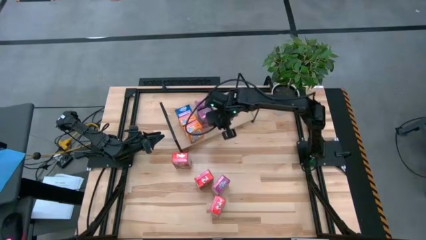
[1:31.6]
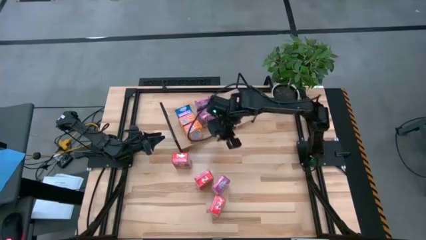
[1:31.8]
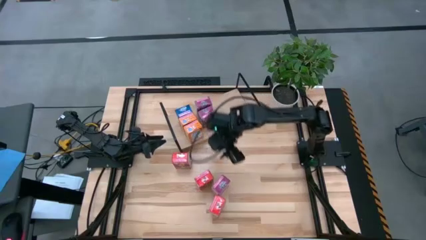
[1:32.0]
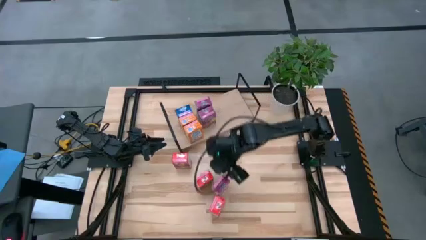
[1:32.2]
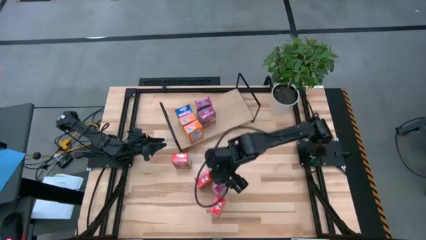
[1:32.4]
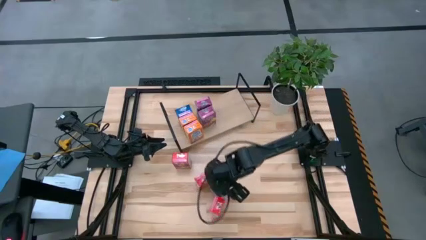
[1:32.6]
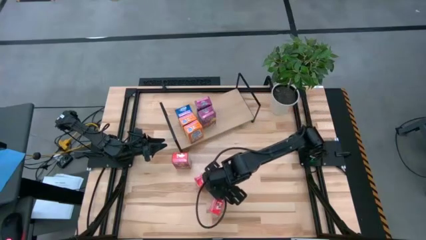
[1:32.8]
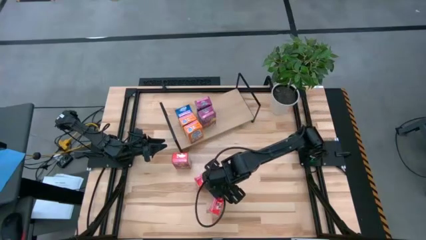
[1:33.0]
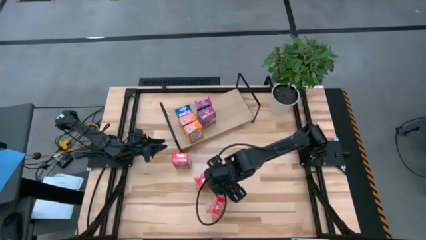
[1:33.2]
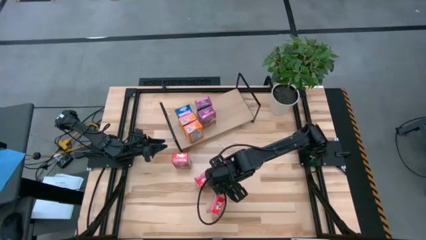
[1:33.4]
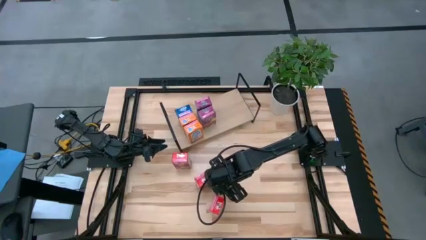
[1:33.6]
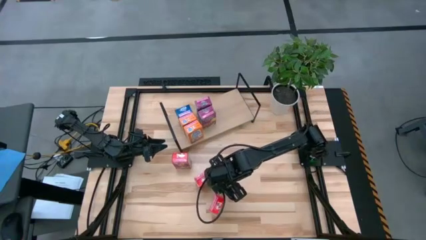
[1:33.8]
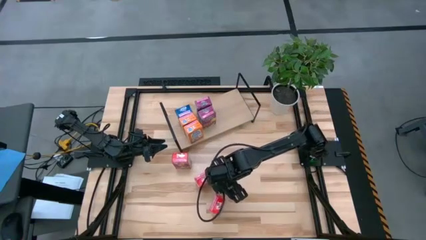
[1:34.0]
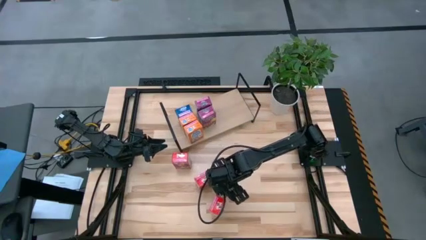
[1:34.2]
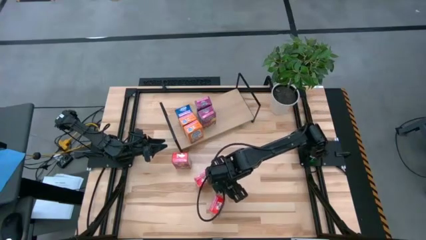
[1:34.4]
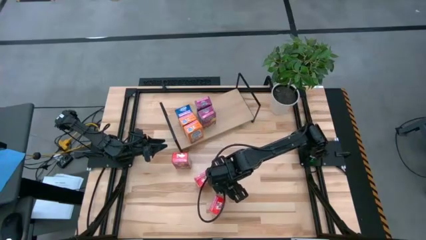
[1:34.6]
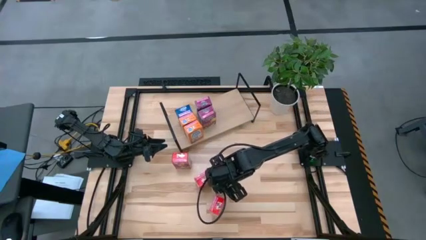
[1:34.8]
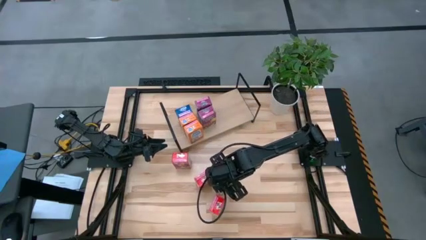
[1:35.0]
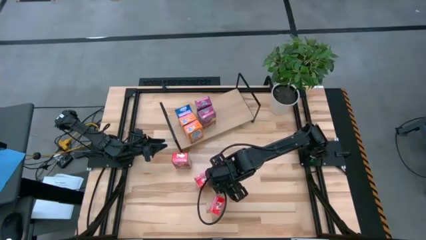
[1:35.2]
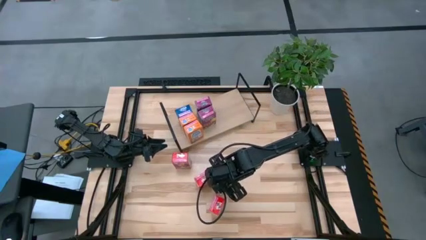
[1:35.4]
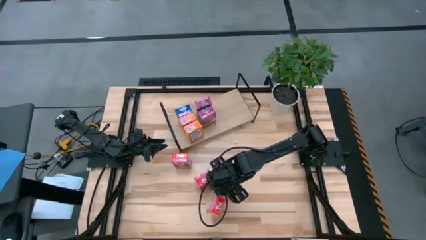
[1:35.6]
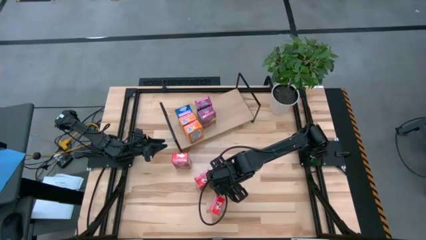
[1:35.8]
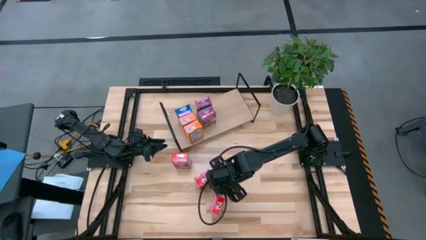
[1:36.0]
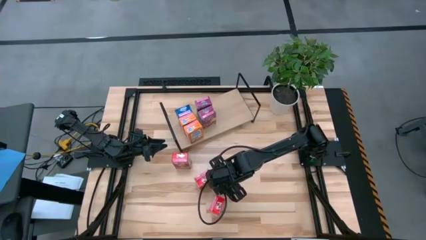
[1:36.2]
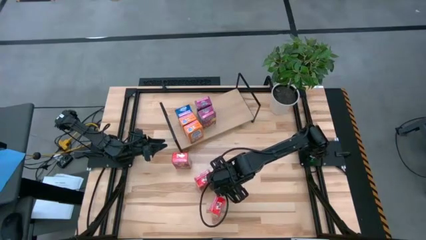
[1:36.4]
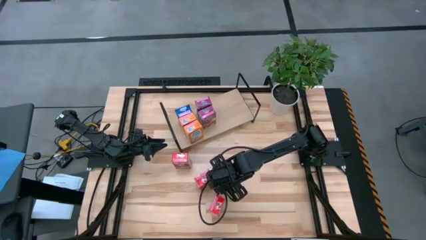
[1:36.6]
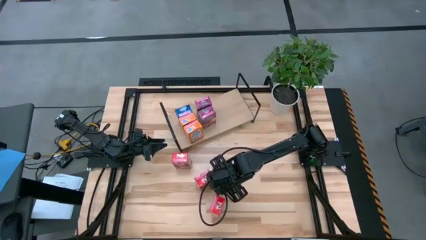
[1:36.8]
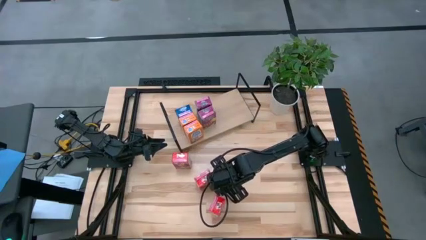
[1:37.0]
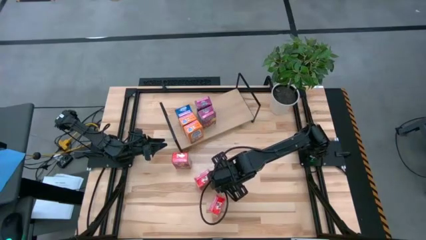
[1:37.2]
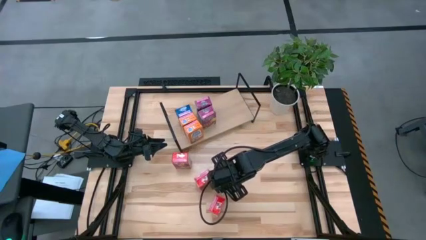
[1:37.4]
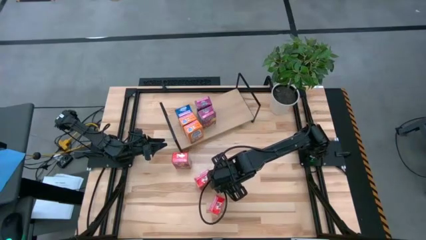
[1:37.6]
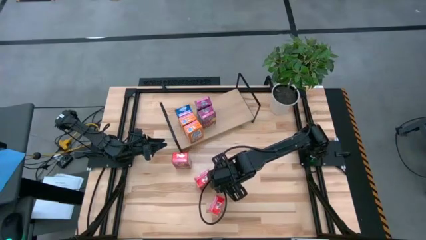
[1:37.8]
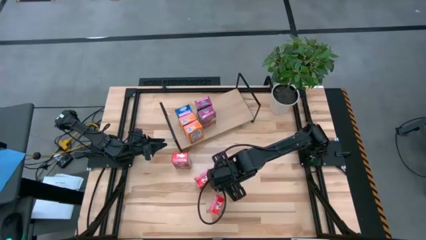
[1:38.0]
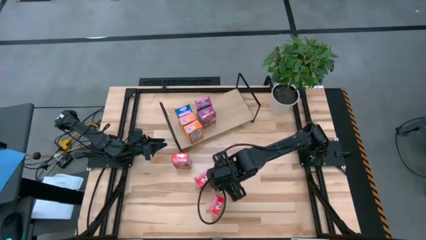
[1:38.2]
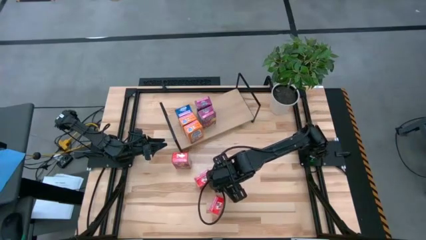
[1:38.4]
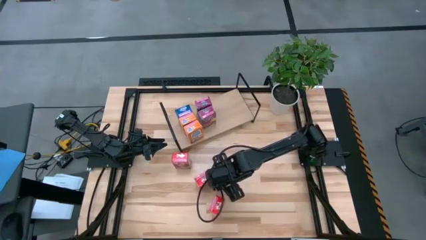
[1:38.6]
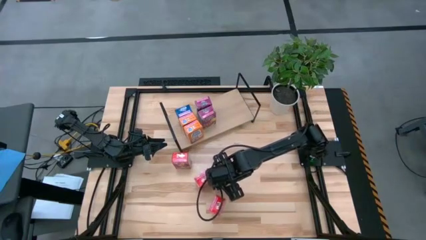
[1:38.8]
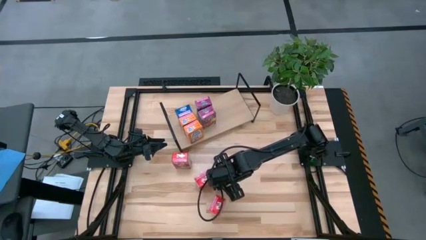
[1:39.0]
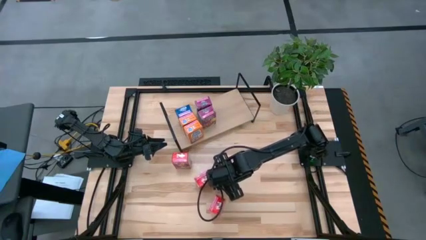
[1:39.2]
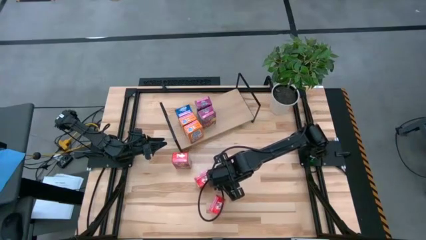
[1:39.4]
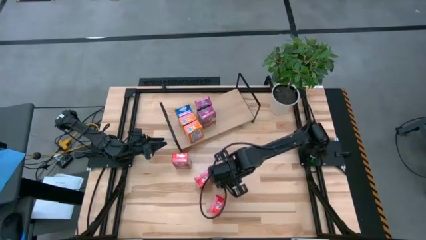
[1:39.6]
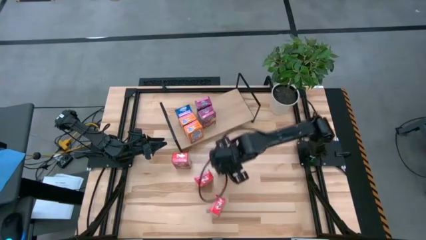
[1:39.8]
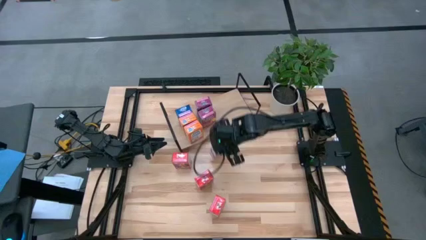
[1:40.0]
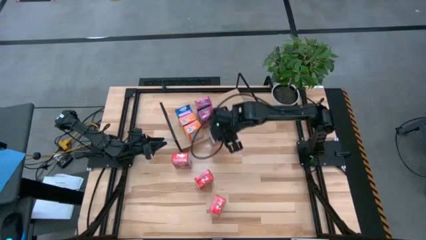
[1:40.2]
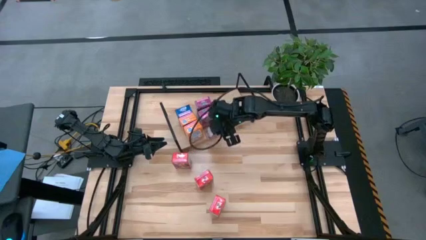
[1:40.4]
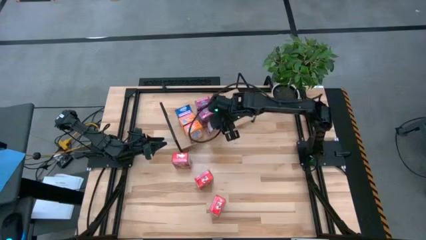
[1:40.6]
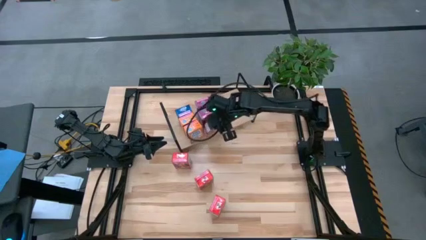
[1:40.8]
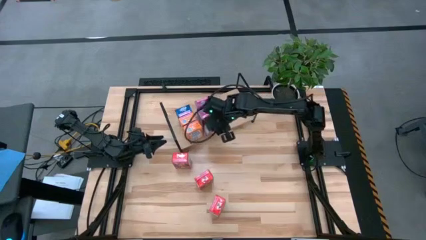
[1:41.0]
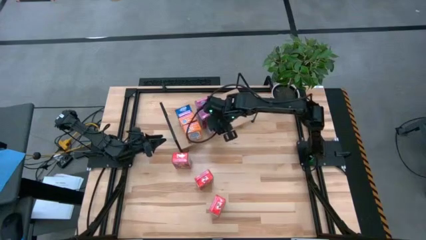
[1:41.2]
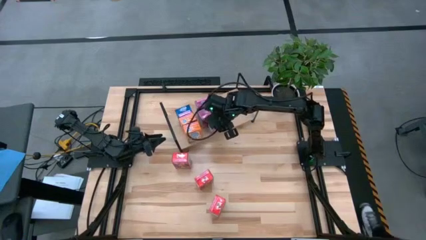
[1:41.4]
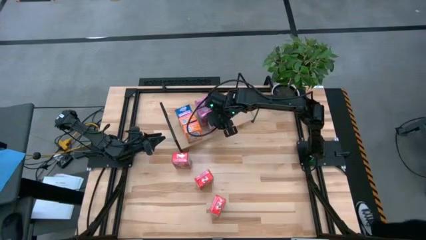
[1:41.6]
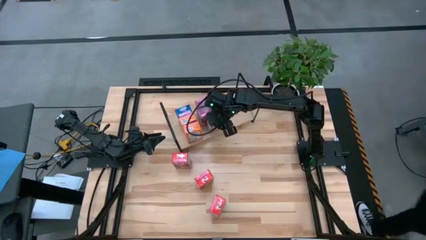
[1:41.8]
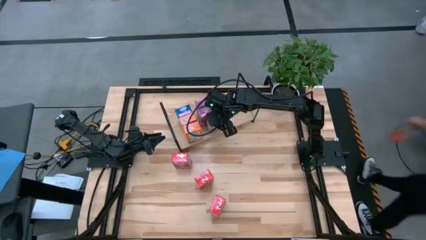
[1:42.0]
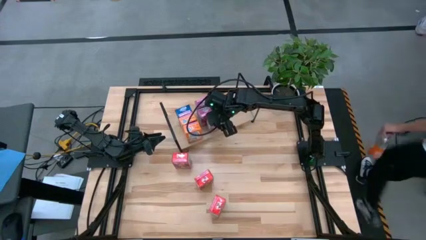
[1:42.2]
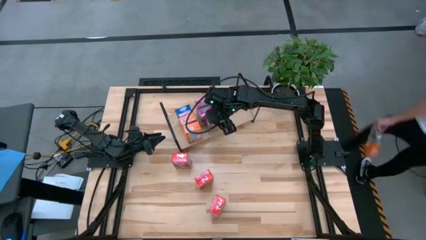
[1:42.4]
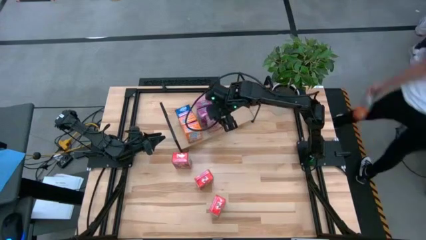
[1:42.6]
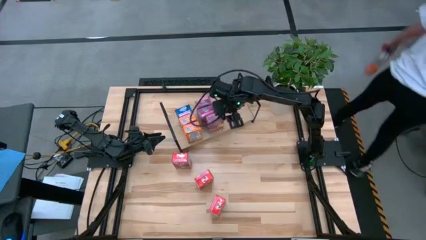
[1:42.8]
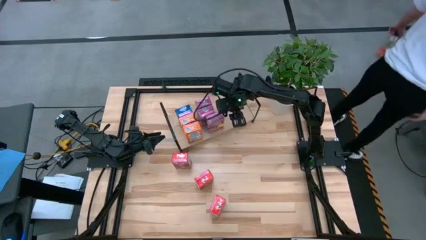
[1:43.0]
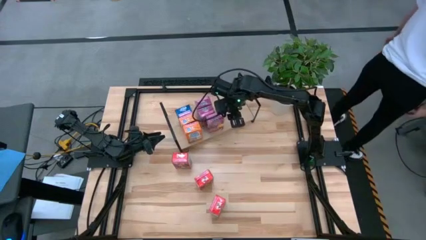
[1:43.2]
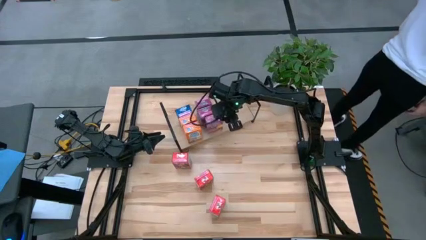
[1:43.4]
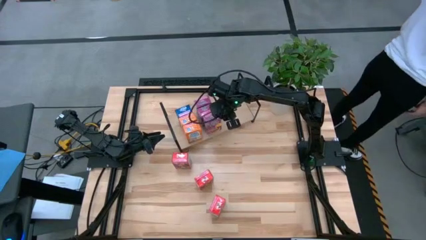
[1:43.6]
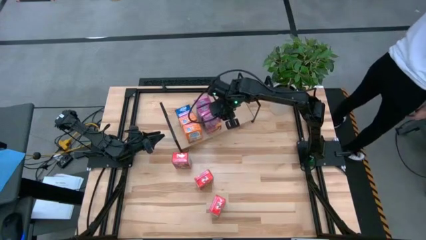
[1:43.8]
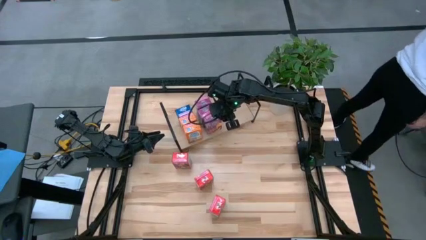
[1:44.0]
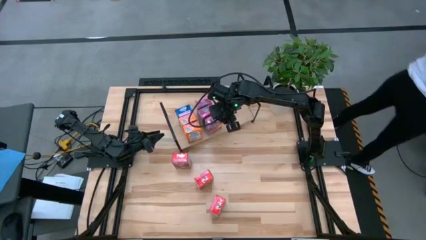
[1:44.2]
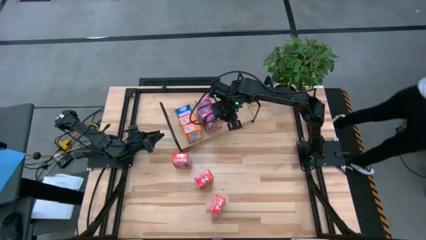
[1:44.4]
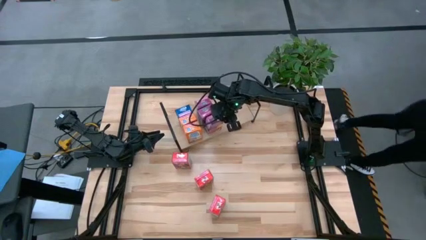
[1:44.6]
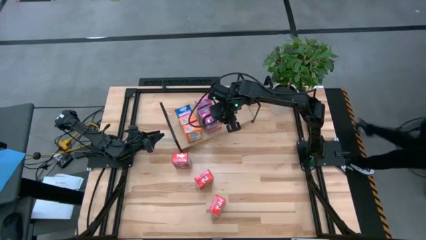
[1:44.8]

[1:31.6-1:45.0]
Task: Stack cereal on shelf
Put the purple cereal box on the shelf aligned with the other purple cereal box

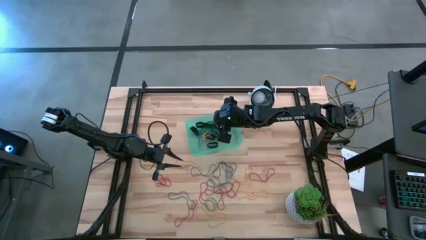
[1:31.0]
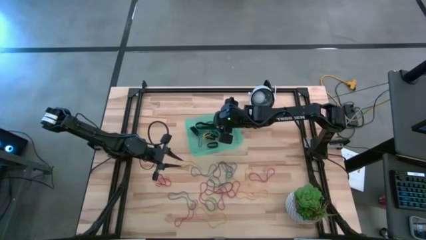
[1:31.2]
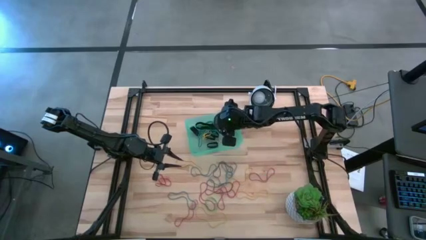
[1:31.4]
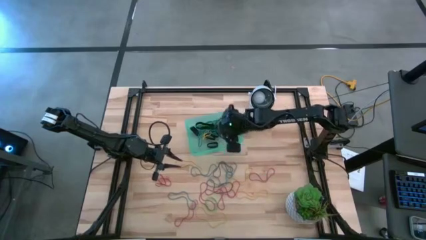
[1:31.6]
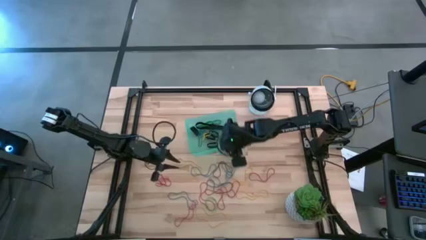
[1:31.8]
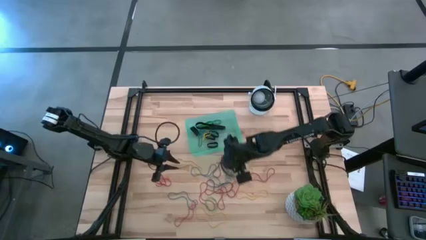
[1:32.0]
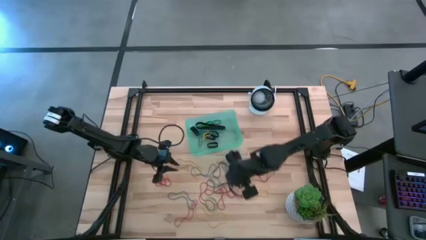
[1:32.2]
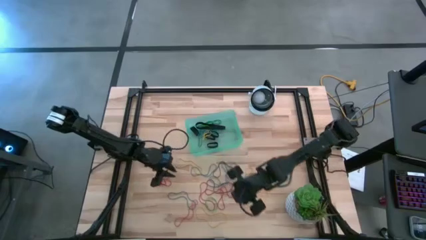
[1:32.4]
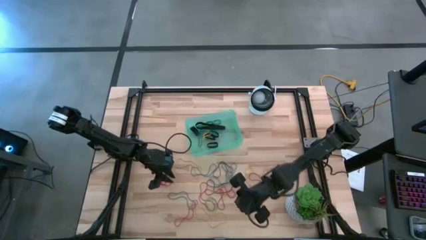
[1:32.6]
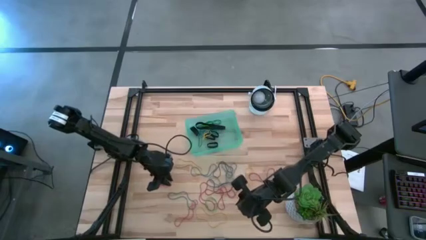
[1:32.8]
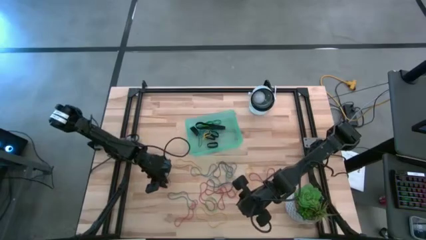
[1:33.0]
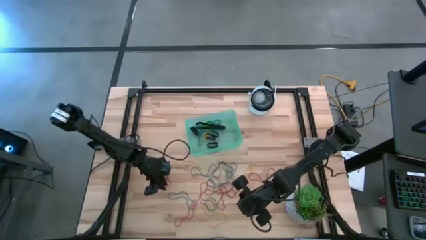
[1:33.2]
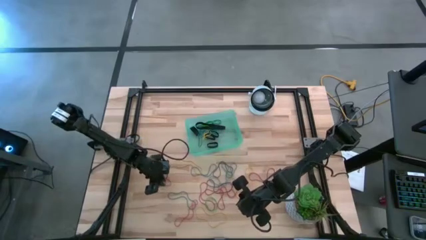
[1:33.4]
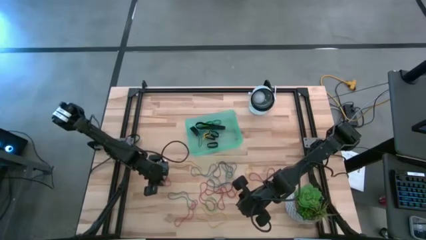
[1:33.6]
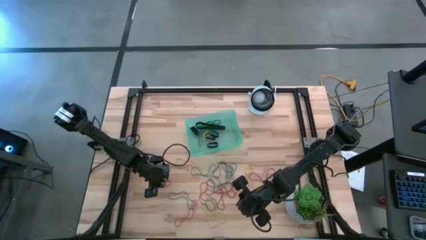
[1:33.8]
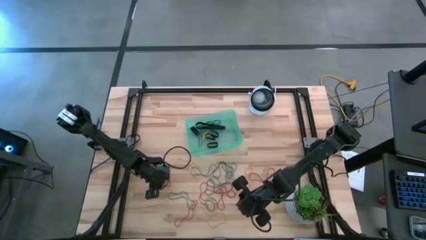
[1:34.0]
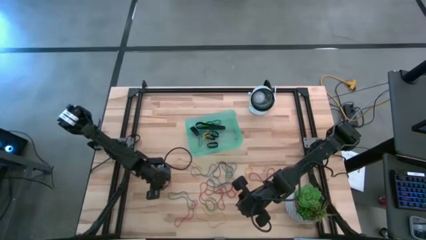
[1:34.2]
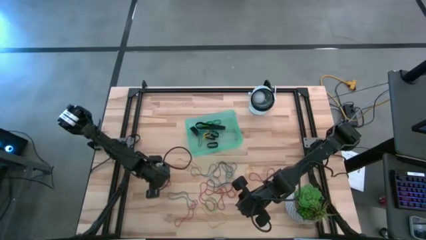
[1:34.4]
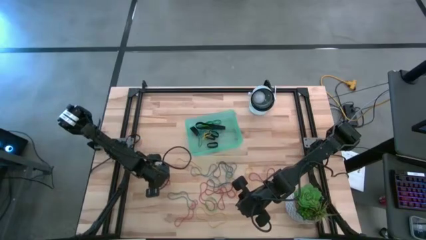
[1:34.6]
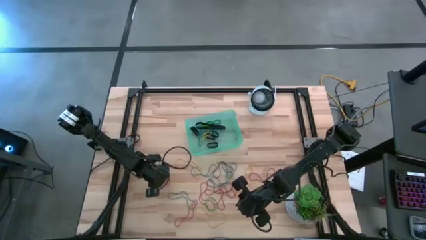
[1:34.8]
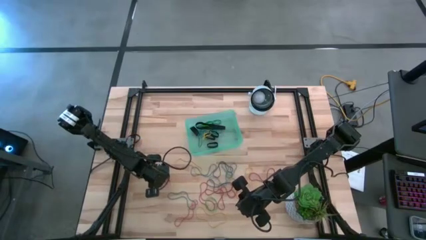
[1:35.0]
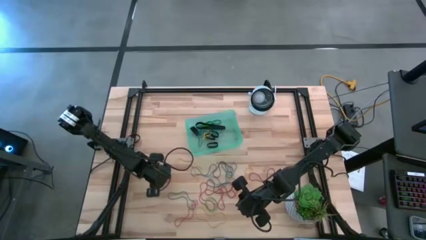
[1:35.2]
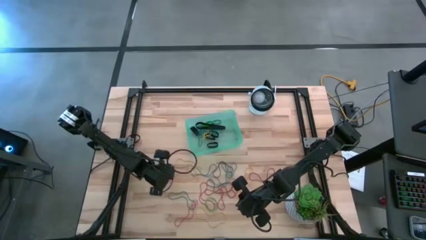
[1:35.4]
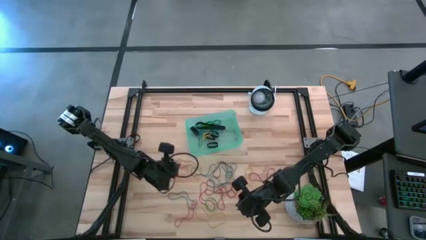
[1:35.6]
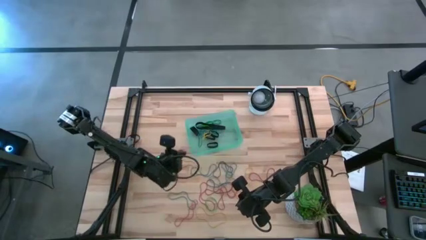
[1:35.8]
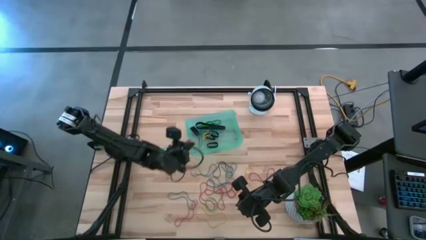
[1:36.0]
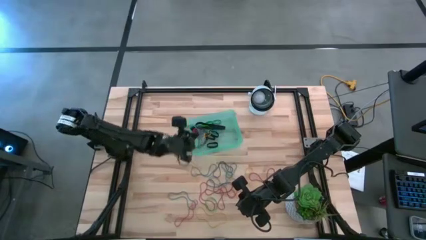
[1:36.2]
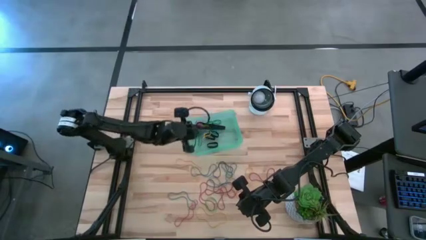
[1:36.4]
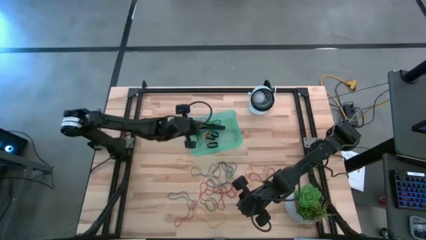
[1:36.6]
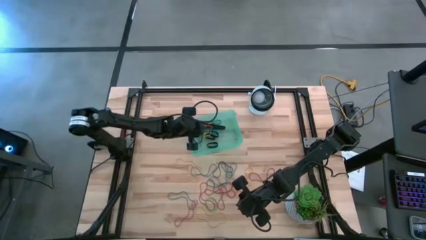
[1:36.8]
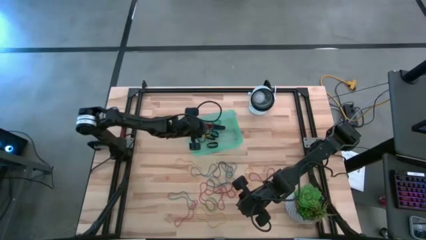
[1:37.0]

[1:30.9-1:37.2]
Task: Pick and place rubber bands into bin
Put the red rubber band into the green bin
